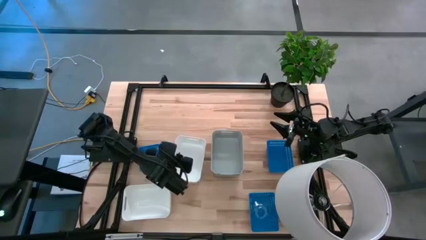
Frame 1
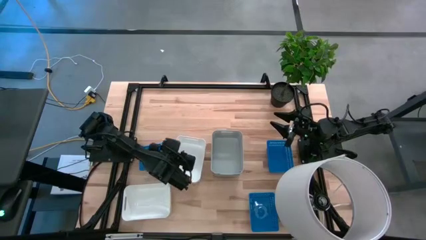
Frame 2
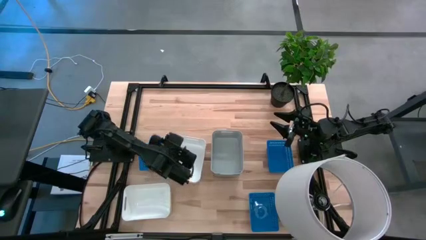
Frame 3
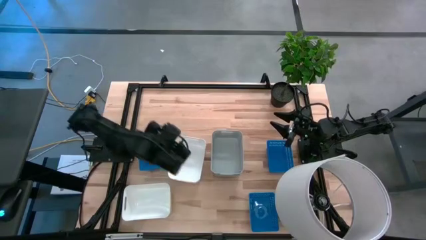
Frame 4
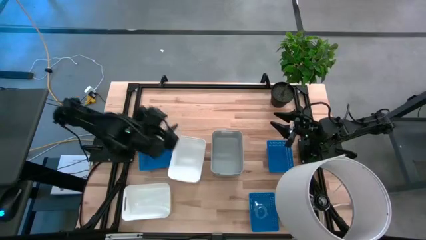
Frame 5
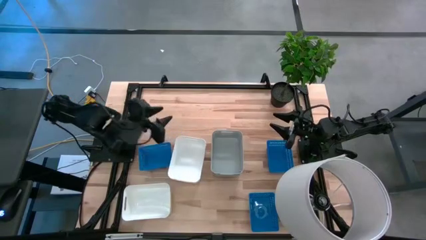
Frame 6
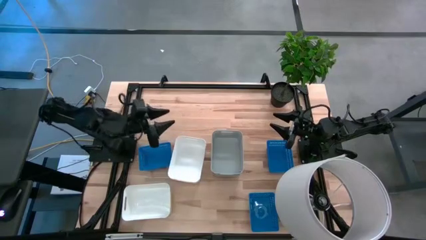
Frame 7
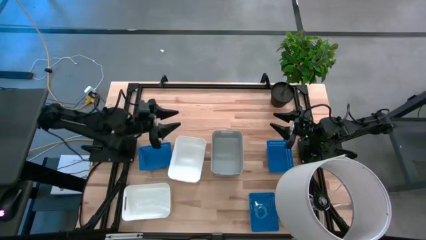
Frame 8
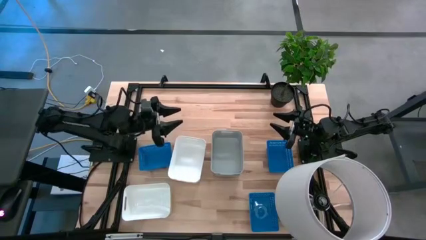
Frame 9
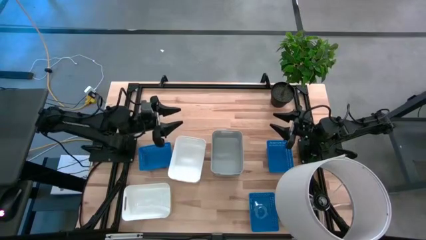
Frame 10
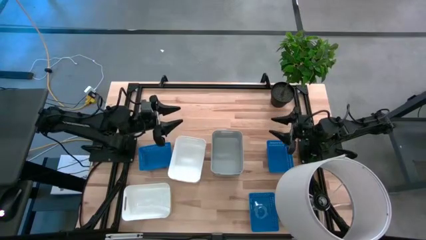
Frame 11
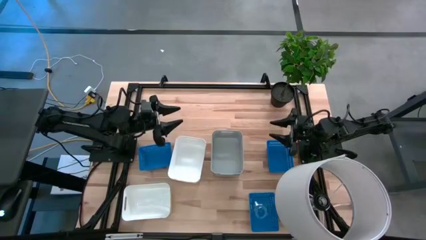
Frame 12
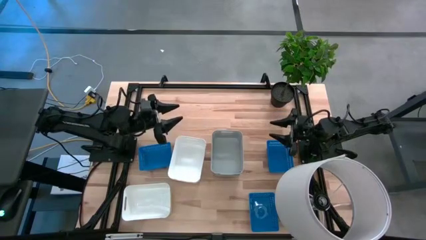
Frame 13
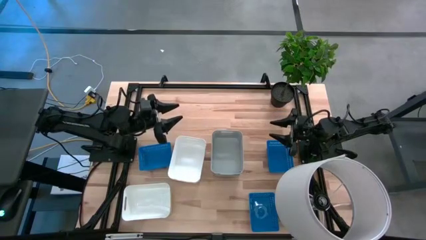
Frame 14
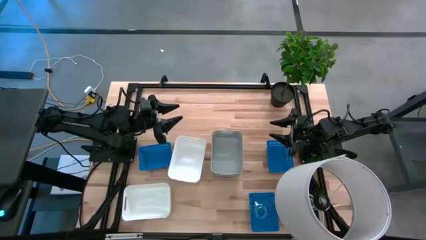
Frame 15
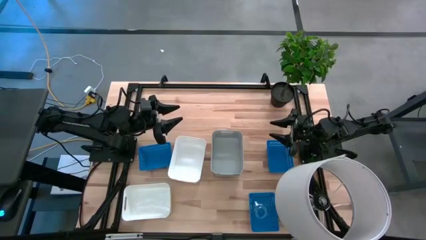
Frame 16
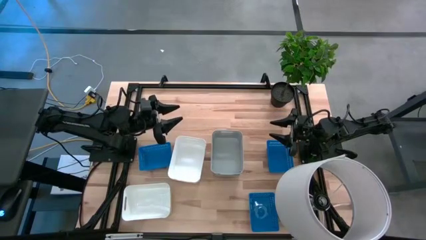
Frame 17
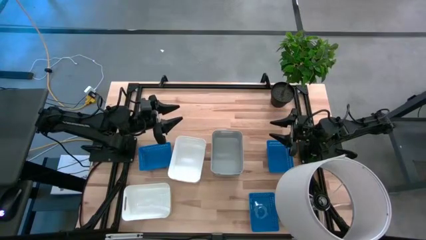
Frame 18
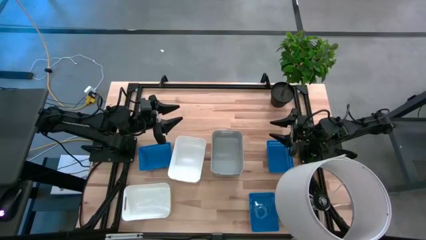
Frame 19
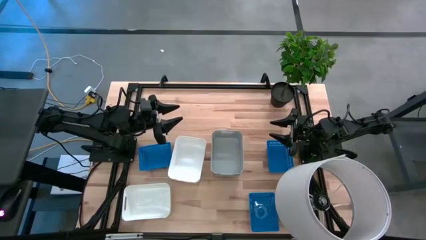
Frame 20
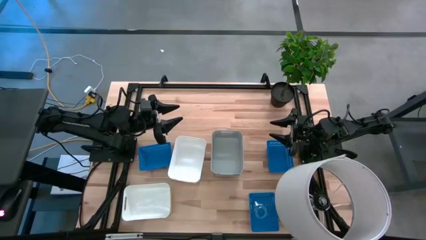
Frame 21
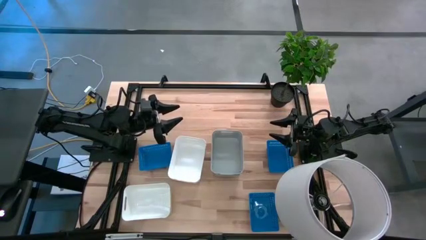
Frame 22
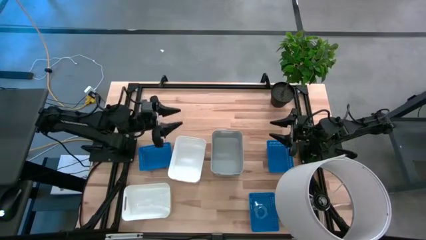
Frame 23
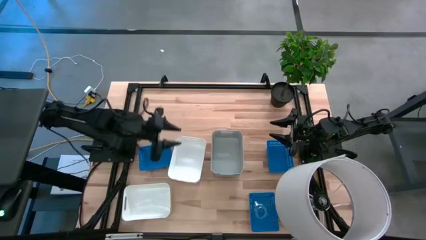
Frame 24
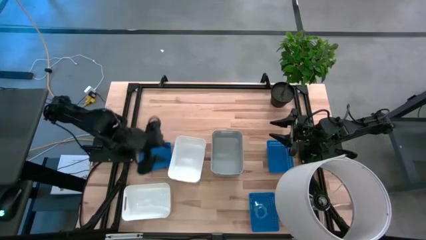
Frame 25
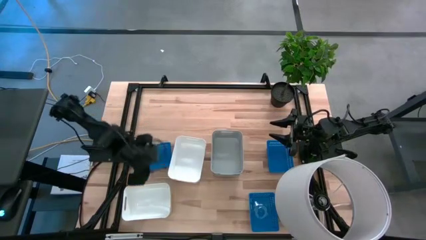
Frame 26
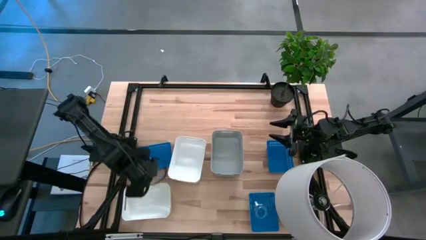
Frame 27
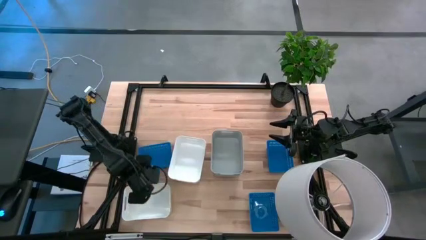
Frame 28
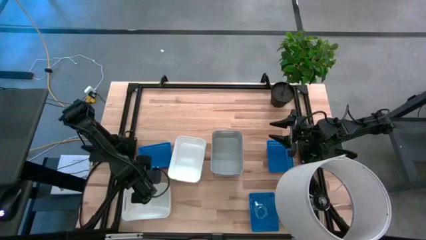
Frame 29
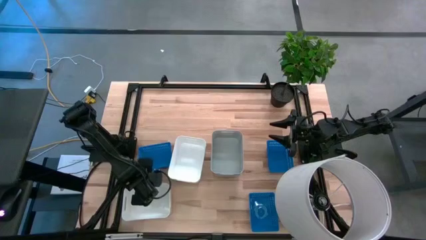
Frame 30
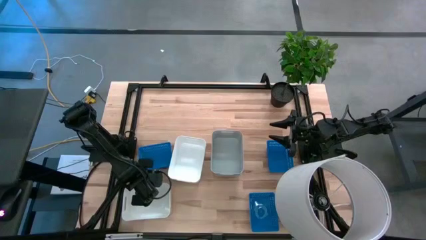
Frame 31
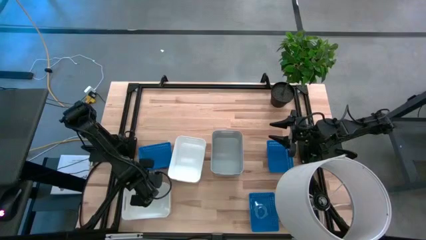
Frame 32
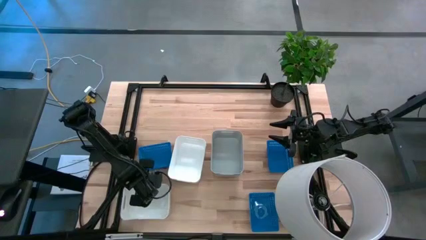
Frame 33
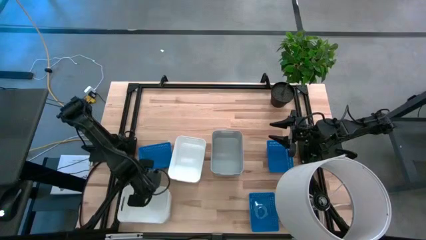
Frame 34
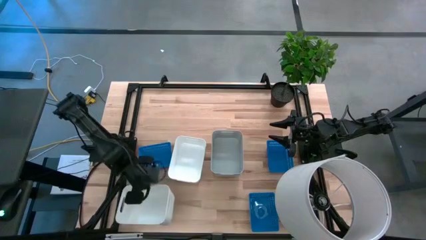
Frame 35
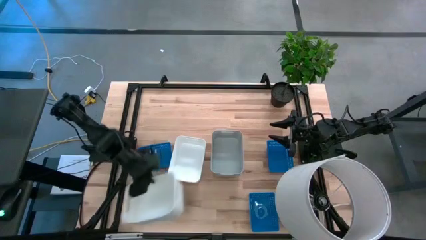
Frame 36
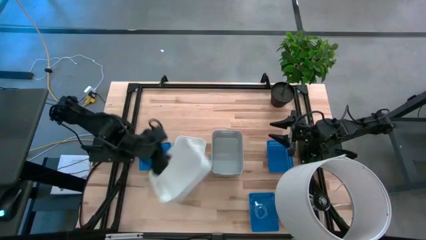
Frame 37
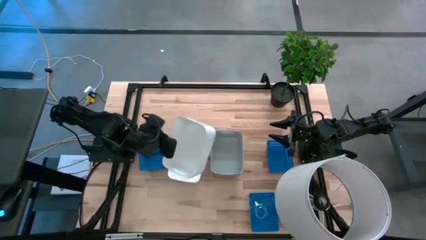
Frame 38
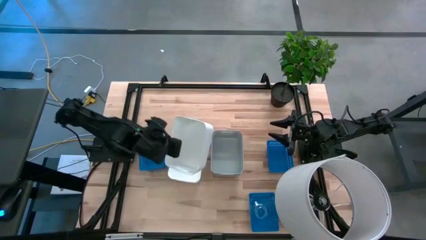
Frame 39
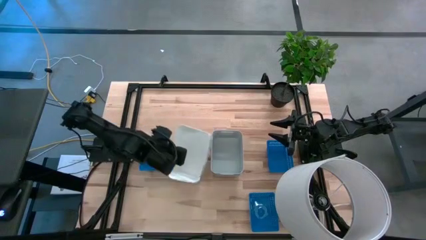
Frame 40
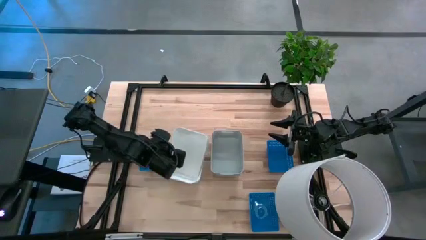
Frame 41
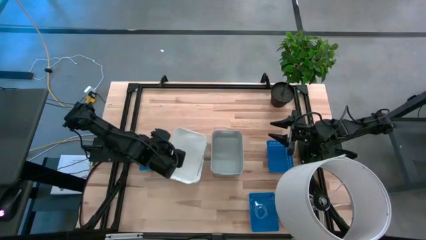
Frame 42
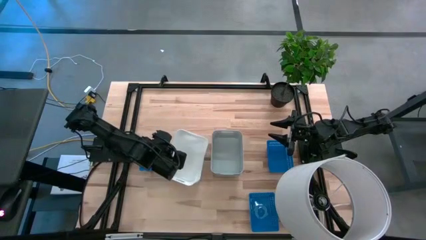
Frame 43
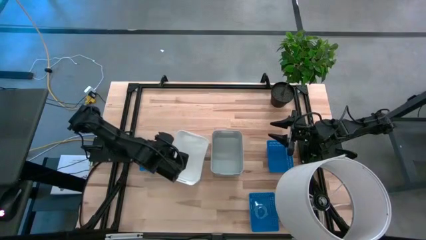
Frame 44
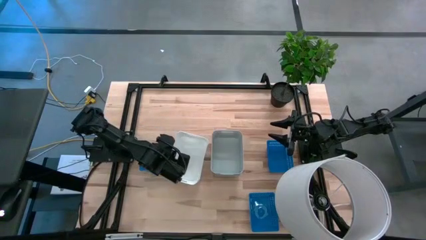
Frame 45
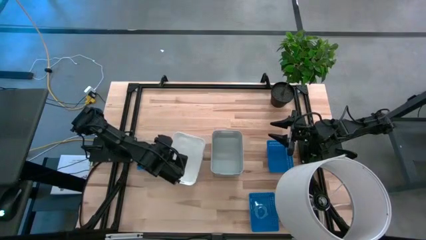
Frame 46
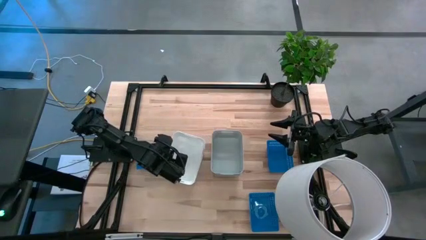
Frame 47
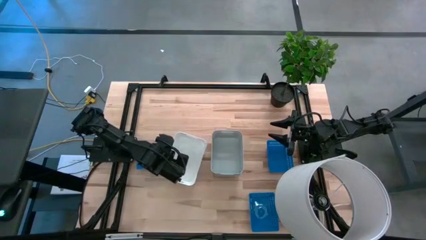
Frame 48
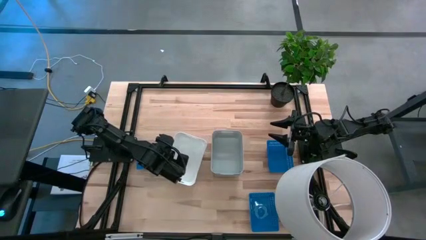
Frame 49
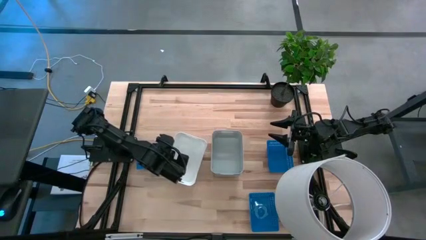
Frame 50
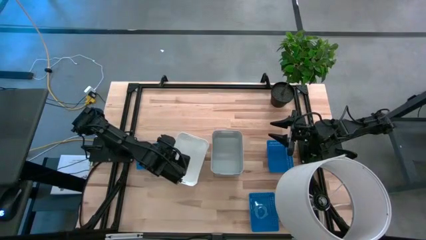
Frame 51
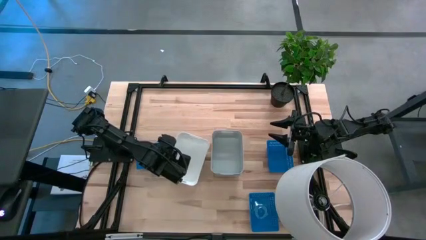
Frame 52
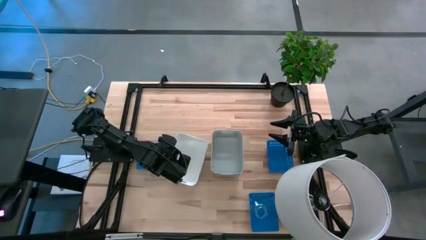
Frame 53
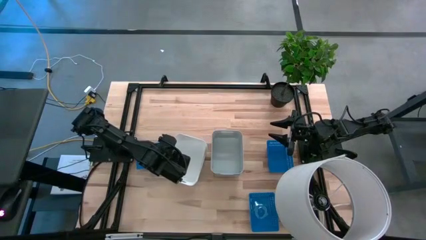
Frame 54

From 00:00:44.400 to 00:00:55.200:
Stack the bottom white bin on top of the other top white bin

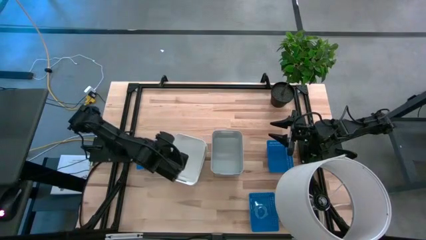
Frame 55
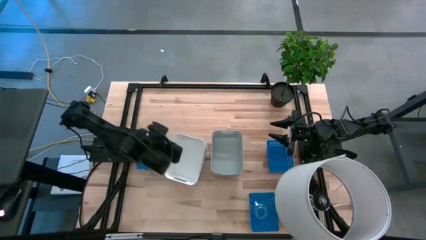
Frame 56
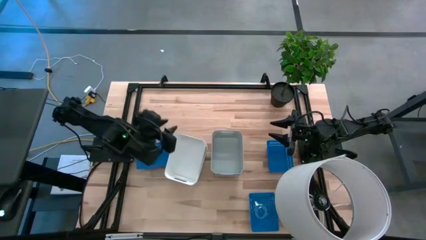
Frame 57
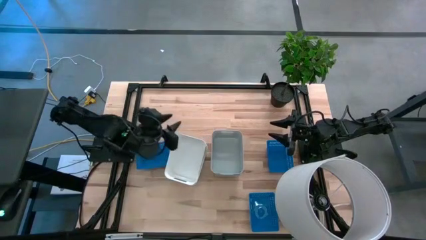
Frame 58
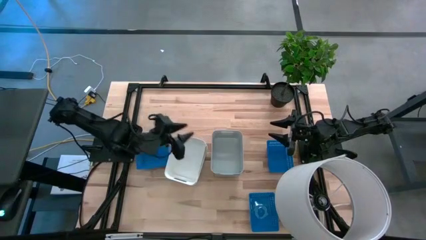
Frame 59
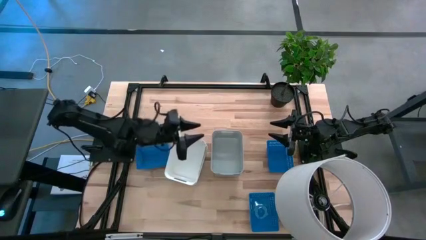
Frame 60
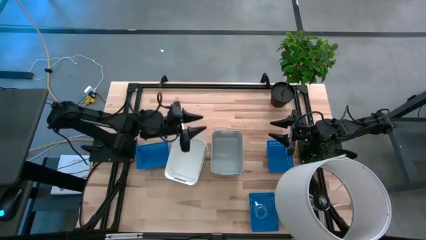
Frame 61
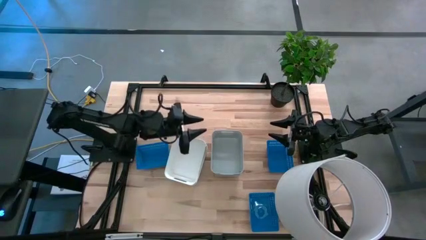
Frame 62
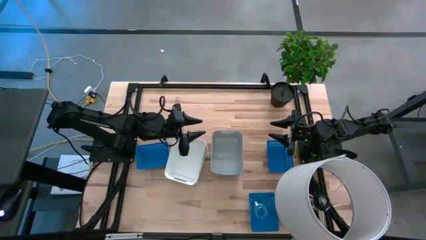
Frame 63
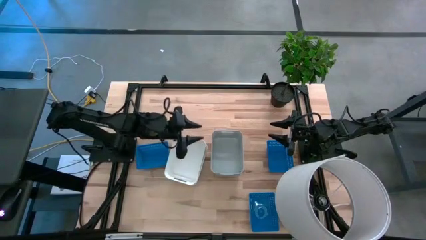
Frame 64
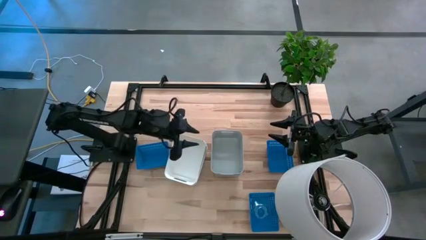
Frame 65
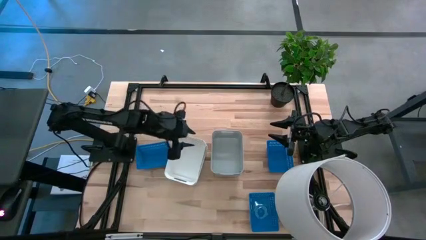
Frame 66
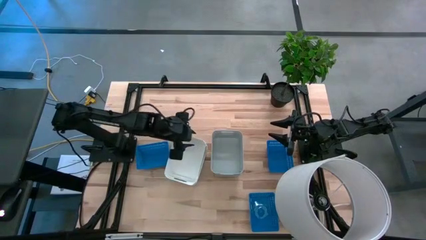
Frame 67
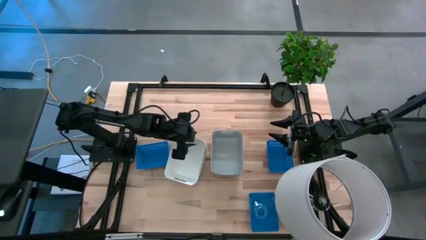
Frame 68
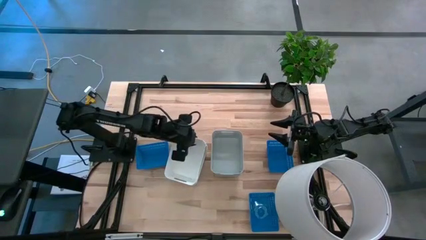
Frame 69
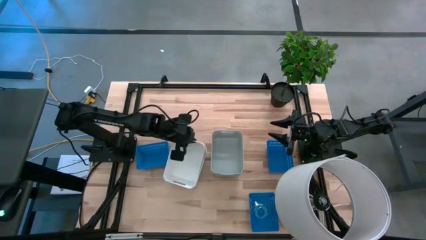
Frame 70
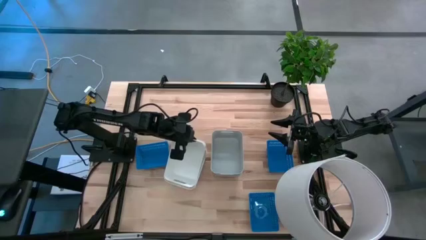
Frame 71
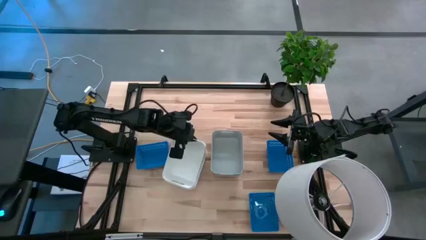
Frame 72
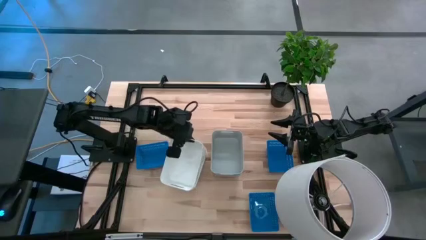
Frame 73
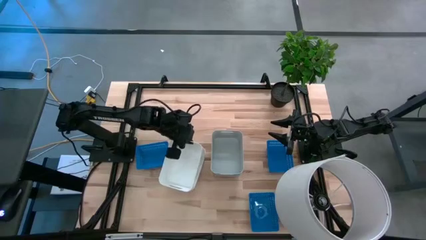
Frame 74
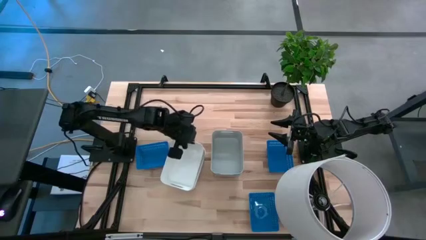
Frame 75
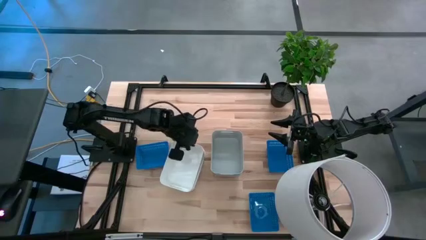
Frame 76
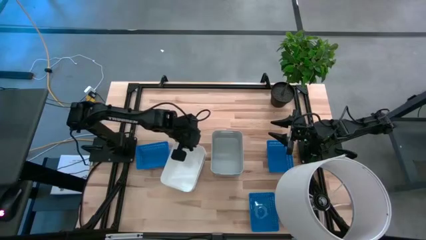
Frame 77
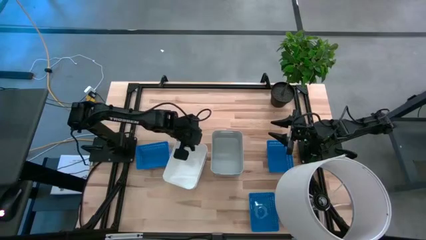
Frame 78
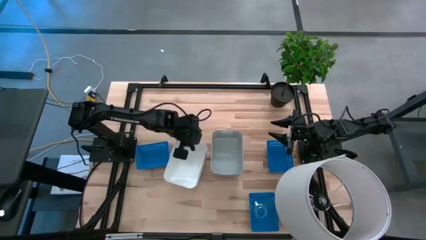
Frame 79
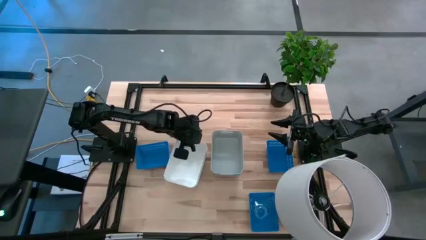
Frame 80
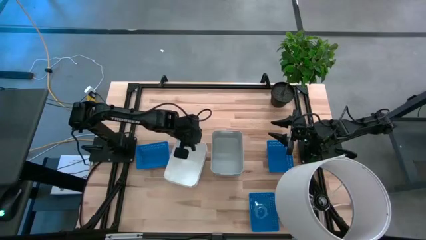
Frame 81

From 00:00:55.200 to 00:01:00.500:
Stack the bottom white bin on top of the other top white bins
